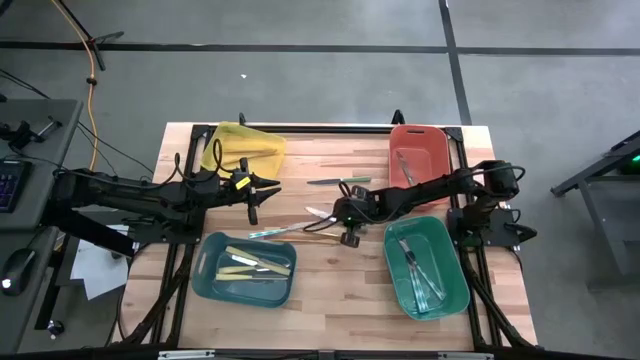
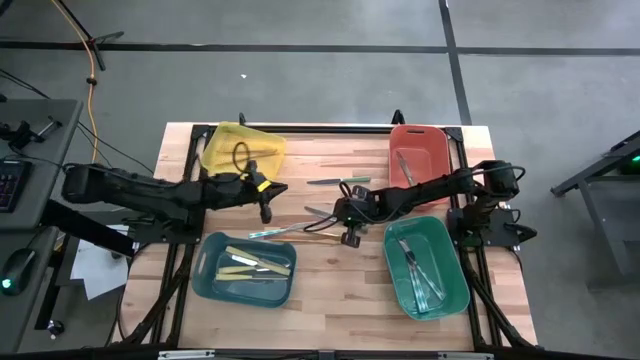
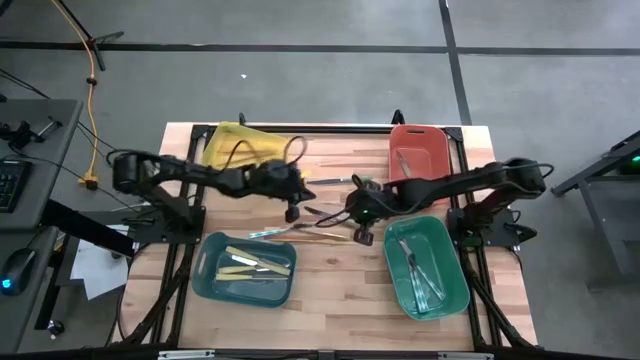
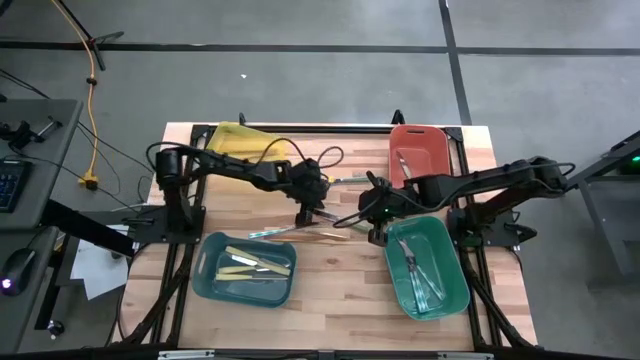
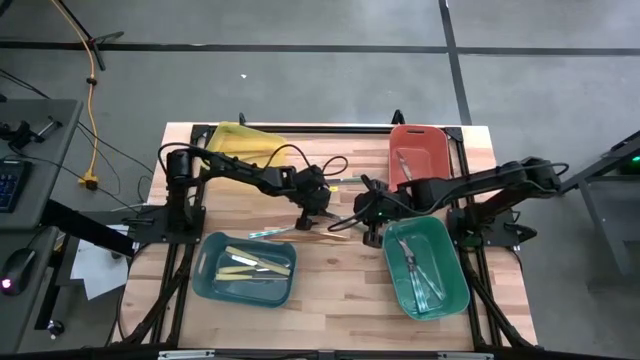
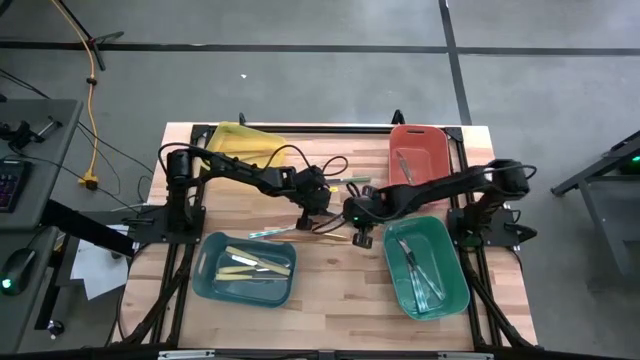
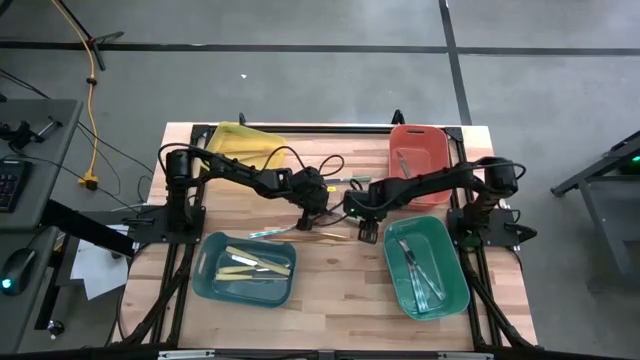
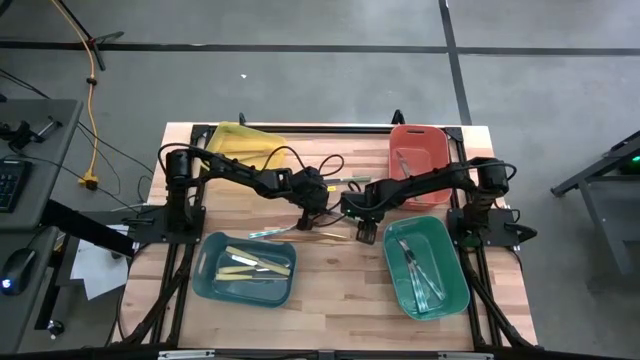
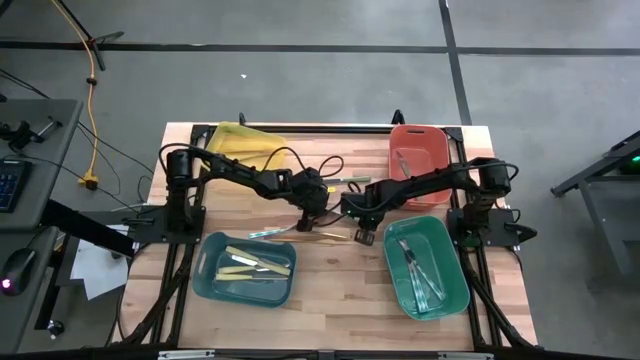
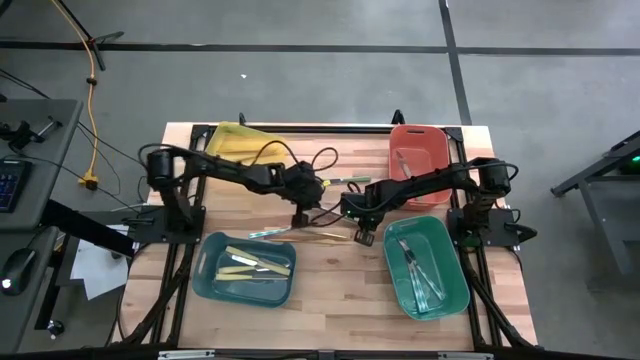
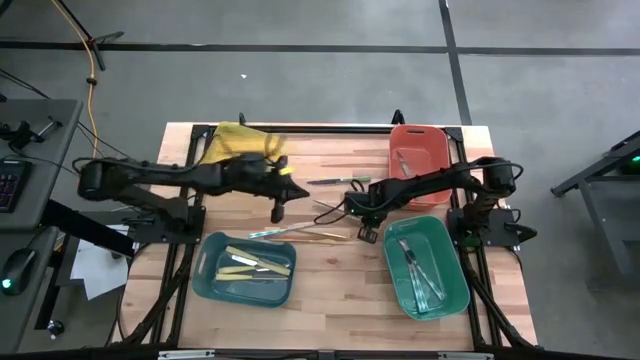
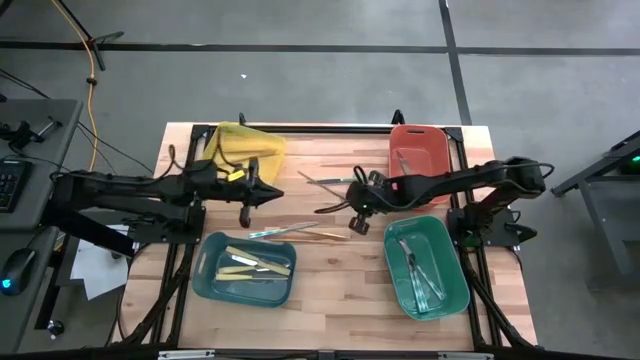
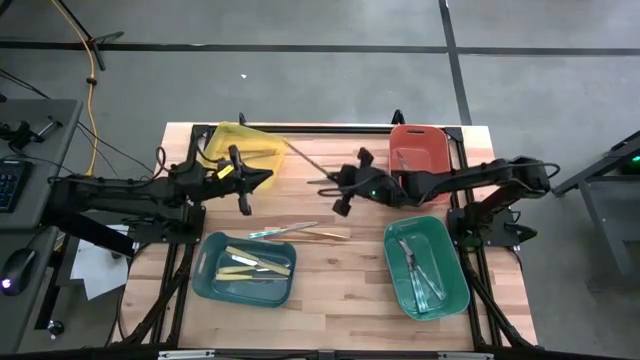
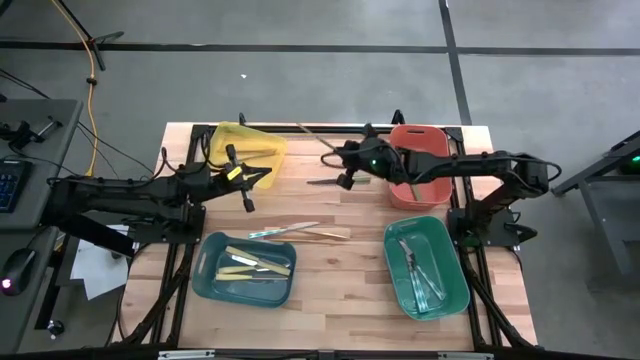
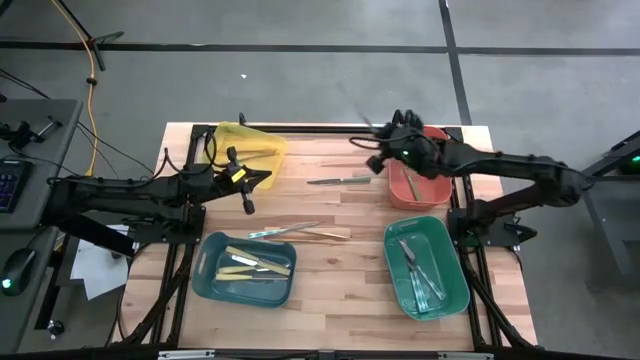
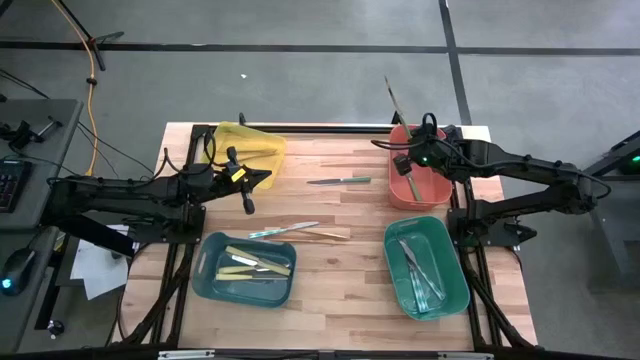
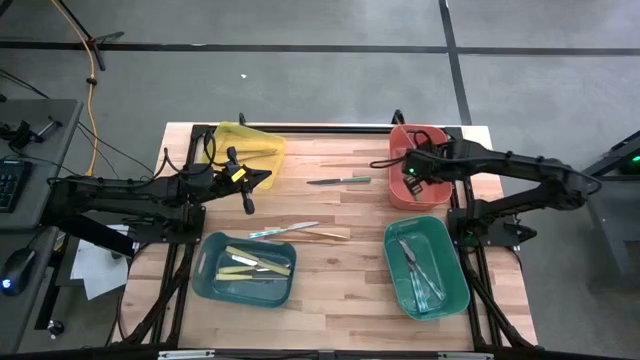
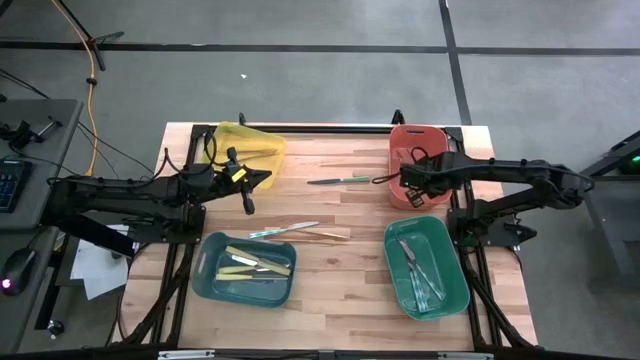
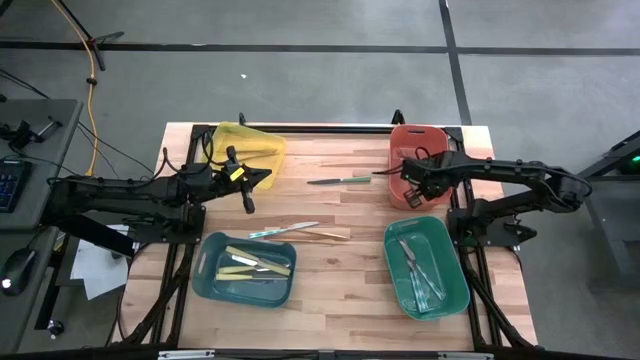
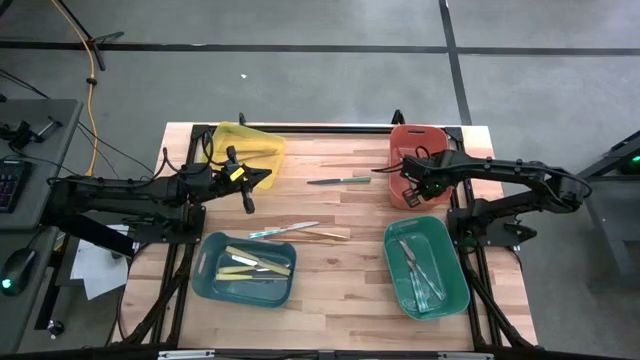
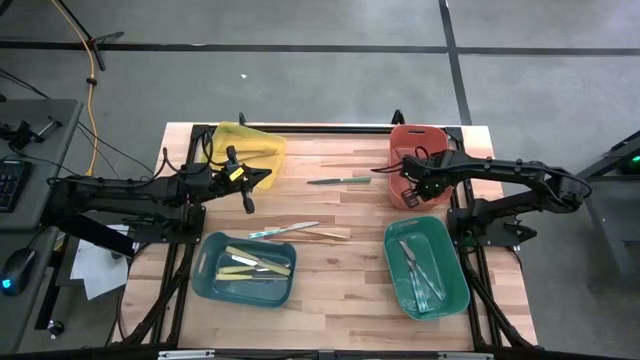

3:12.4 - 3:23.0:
Task: Sort silverware by color (type)
Put the green knife into the orange bin

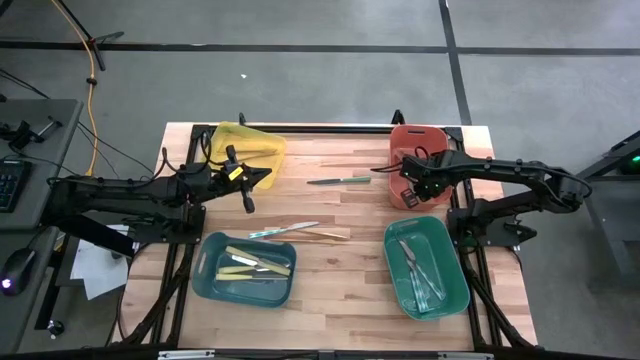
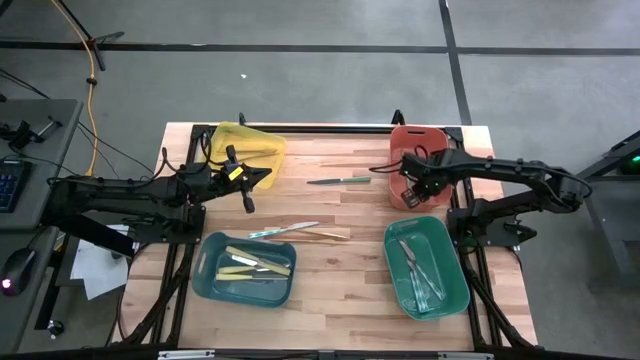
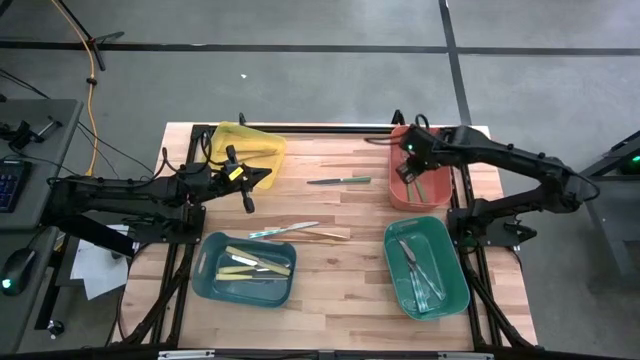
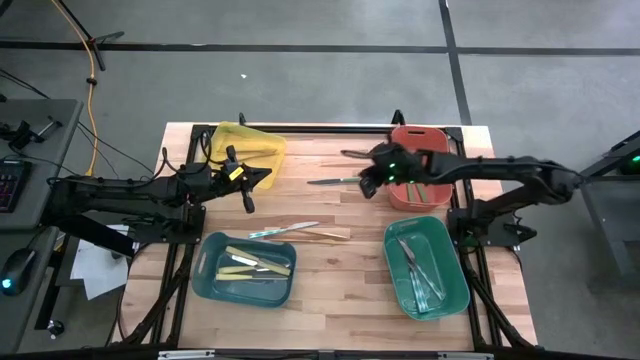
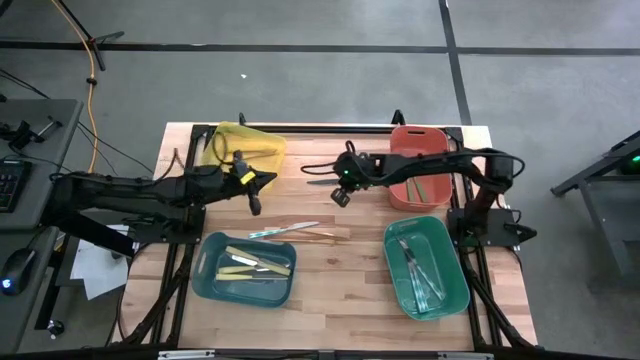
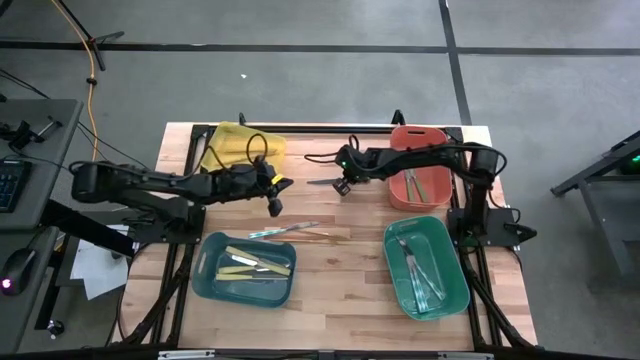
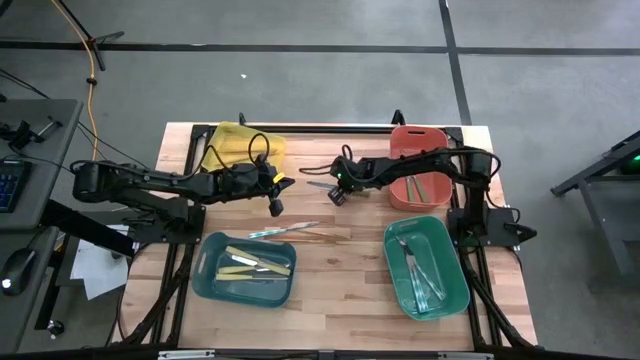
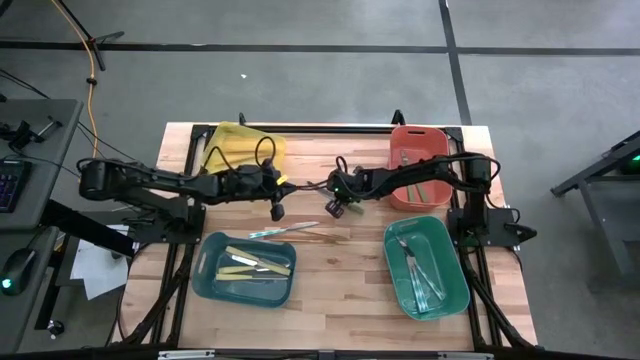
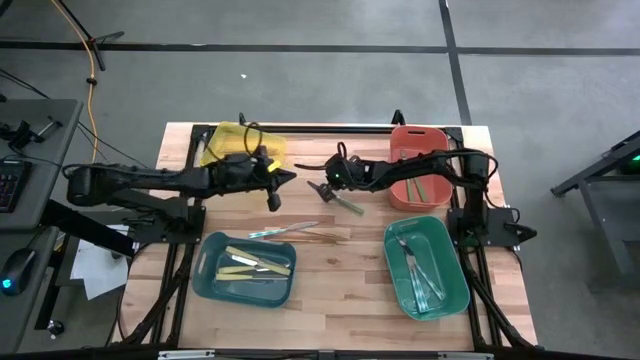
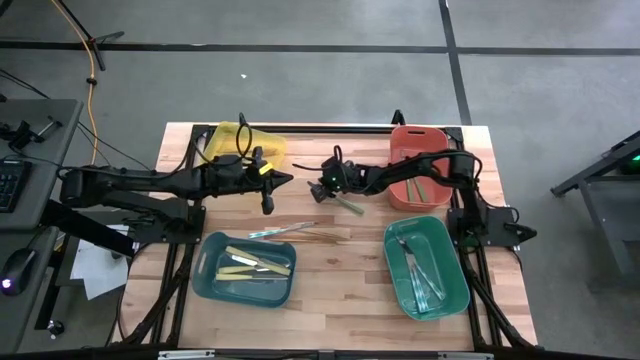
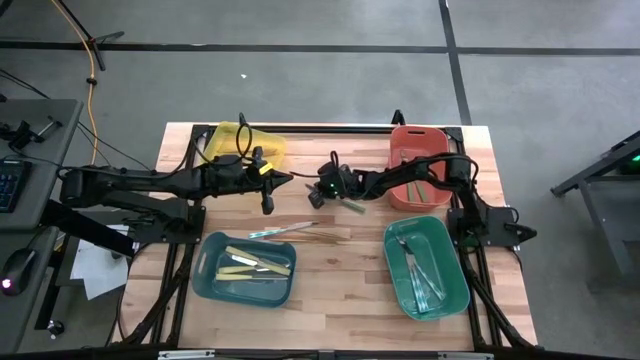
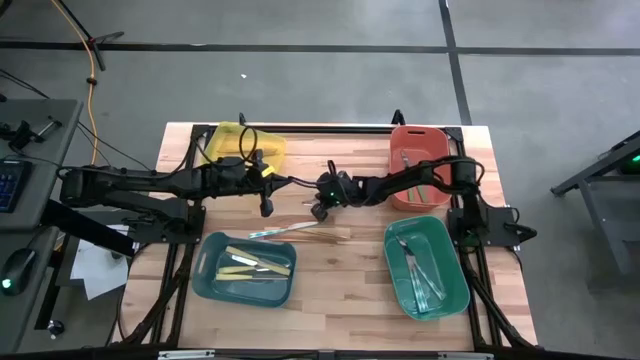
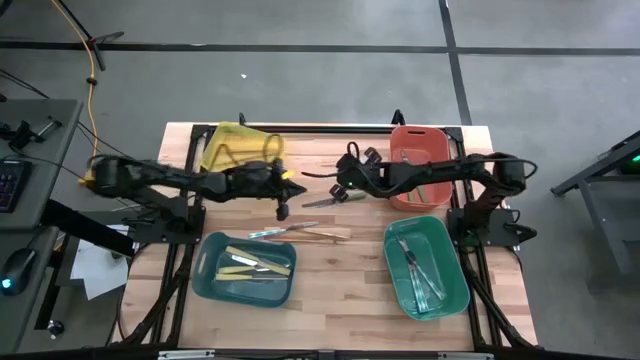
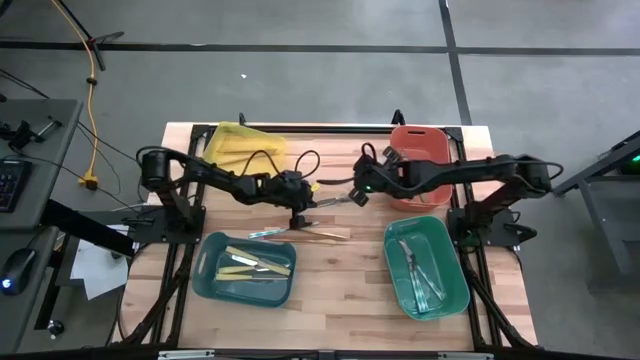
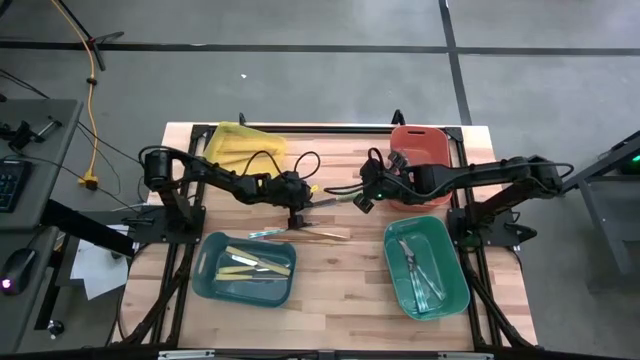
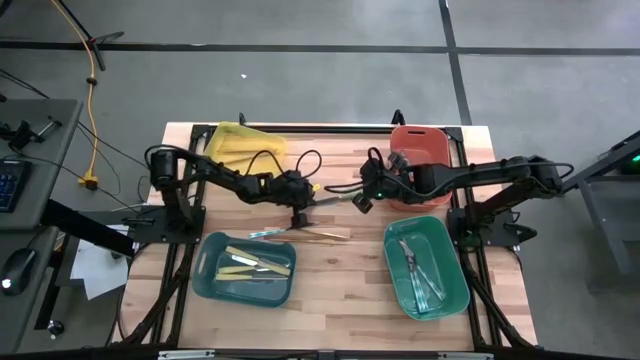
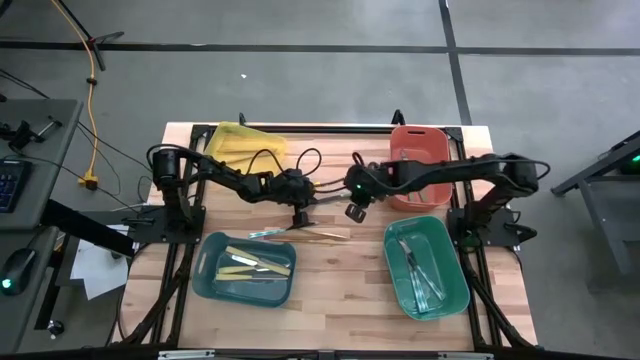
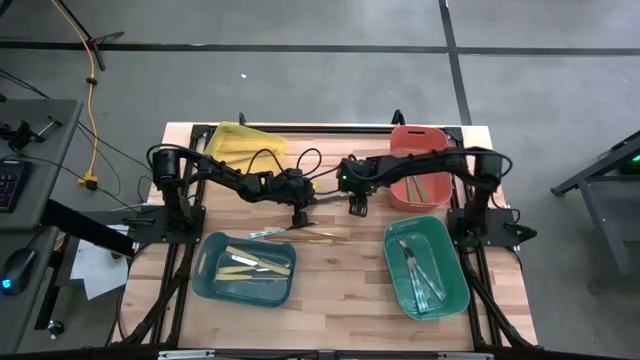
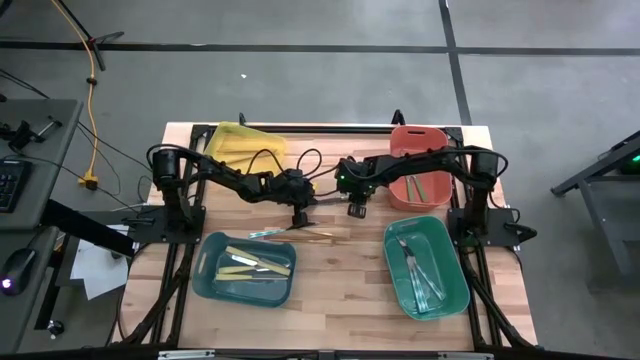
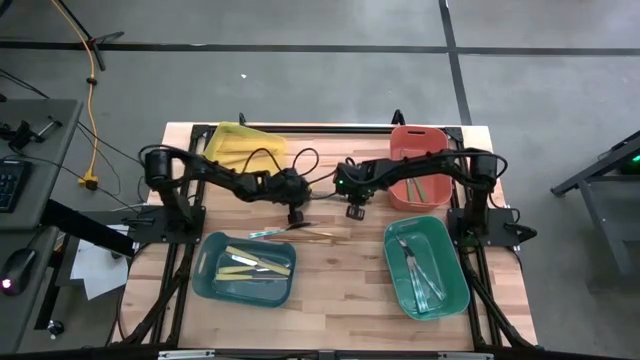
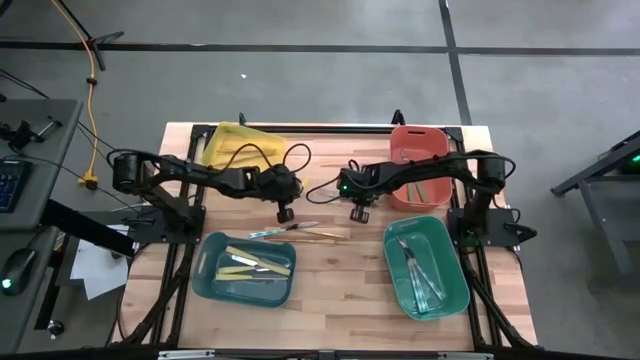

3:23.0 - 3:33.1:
Put the green knife into the orange bin

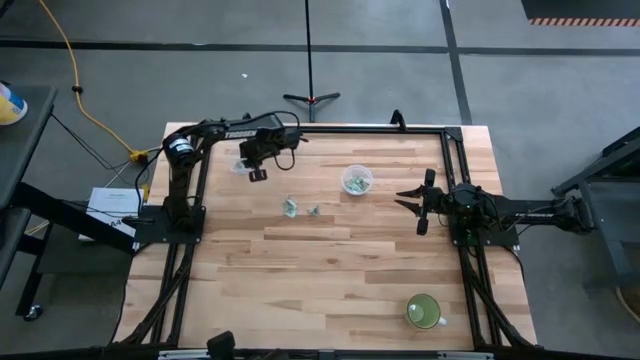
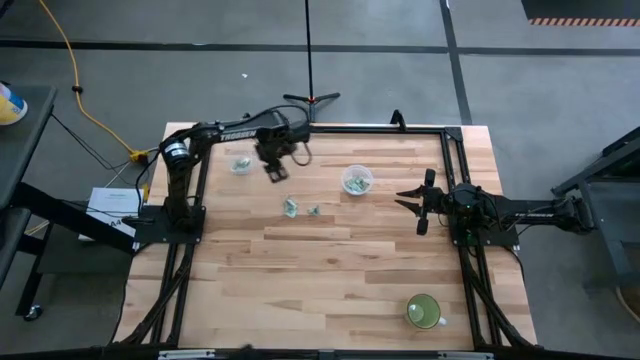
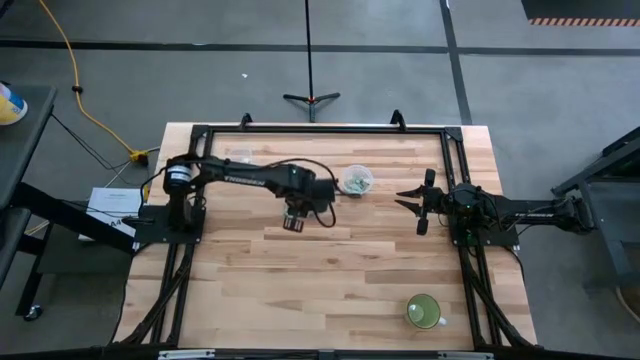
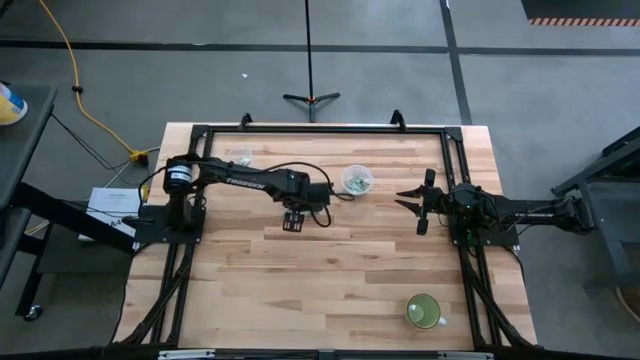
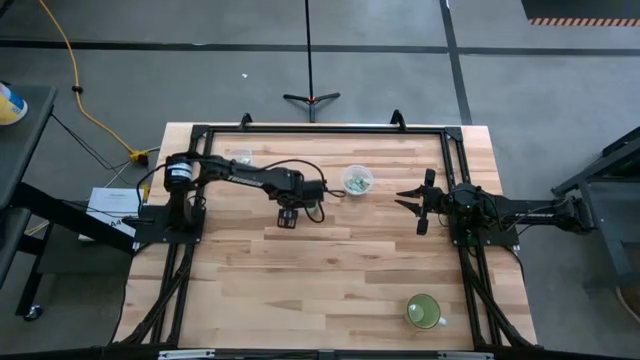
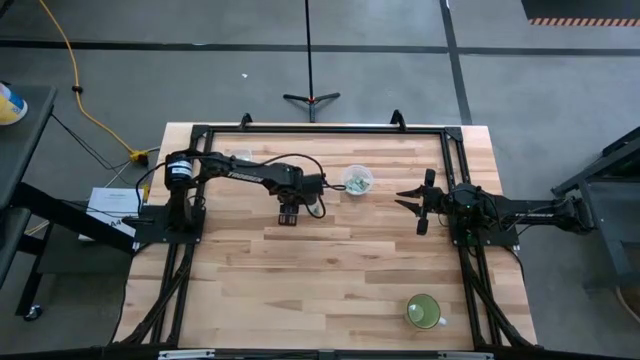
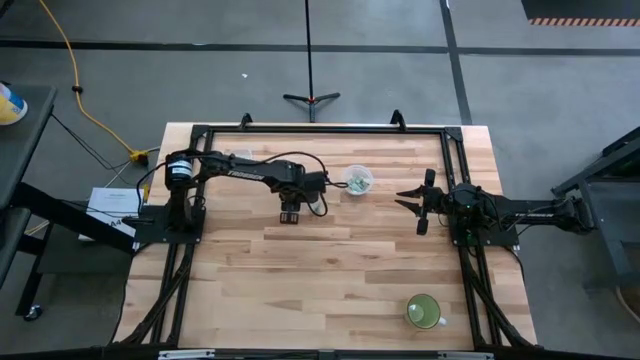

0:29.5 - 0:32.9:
Task: Pick and place Stevia / Truvia into bins
Put the stevia packet into the top transparent container
